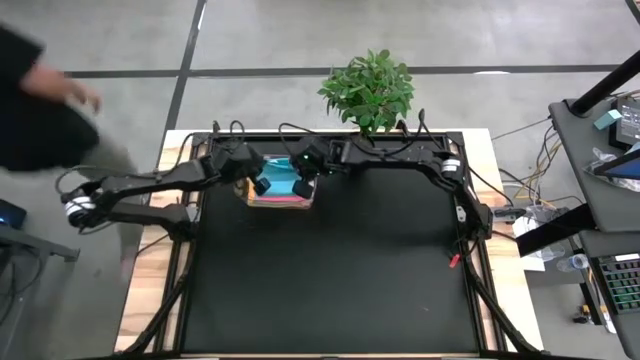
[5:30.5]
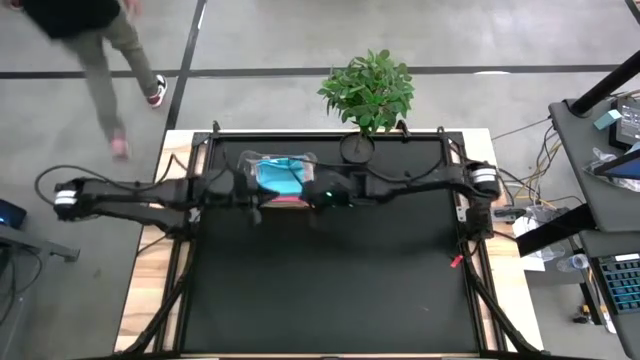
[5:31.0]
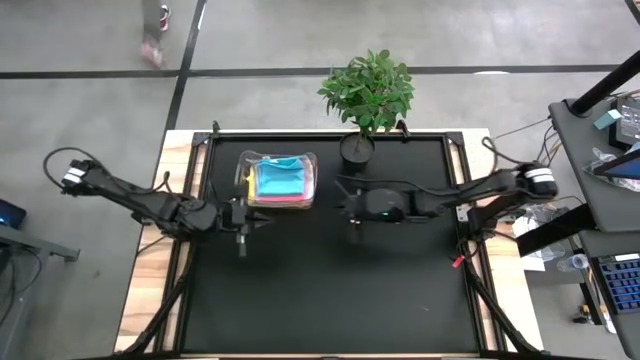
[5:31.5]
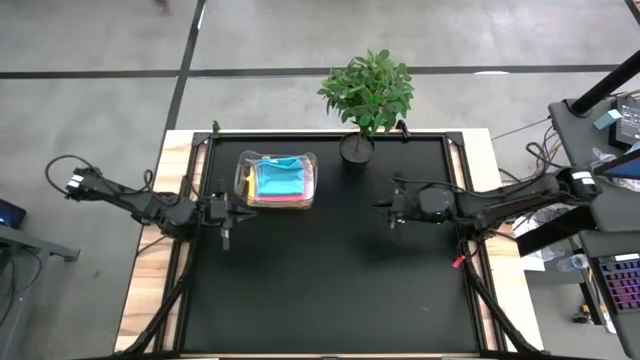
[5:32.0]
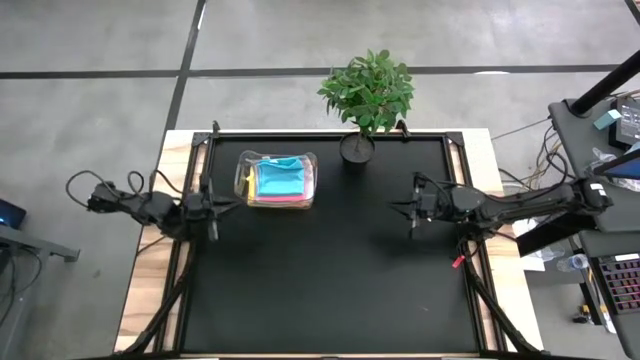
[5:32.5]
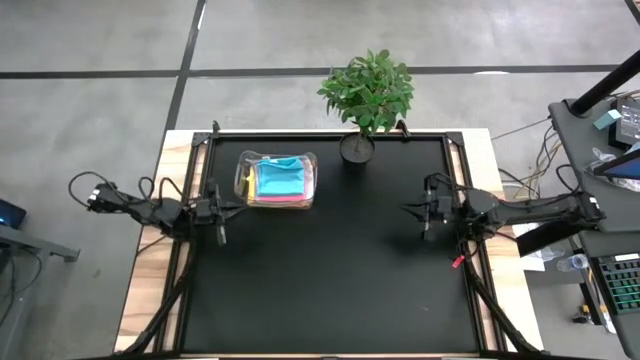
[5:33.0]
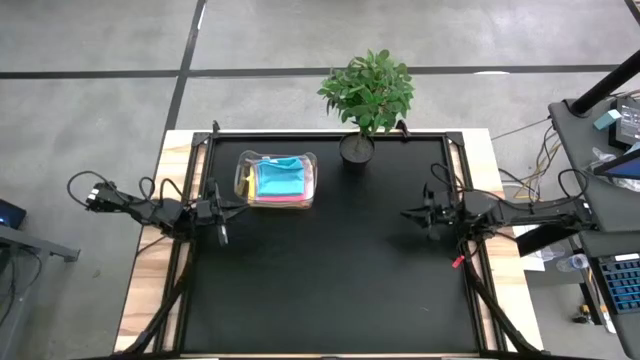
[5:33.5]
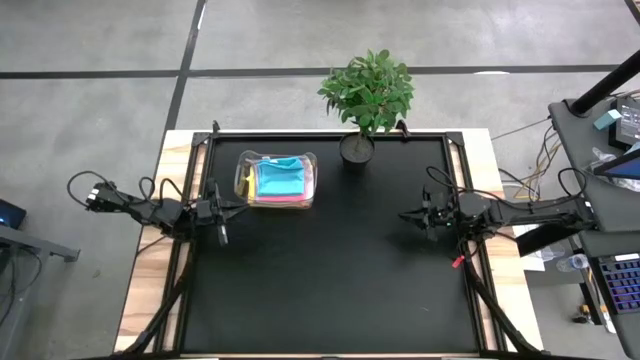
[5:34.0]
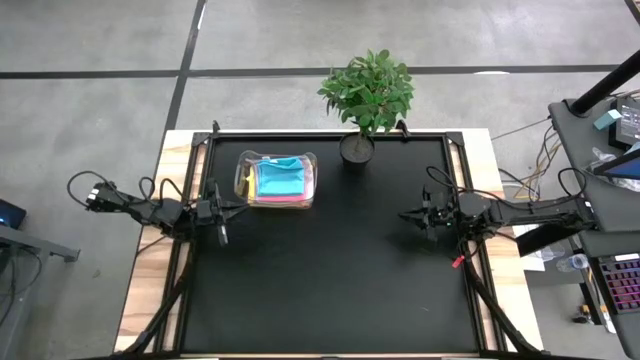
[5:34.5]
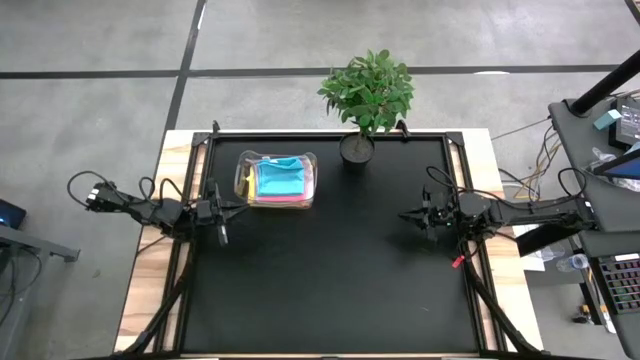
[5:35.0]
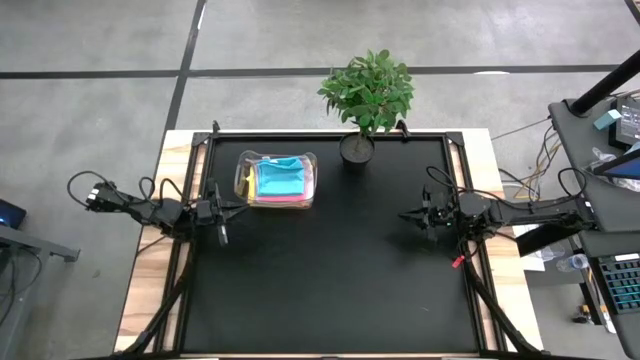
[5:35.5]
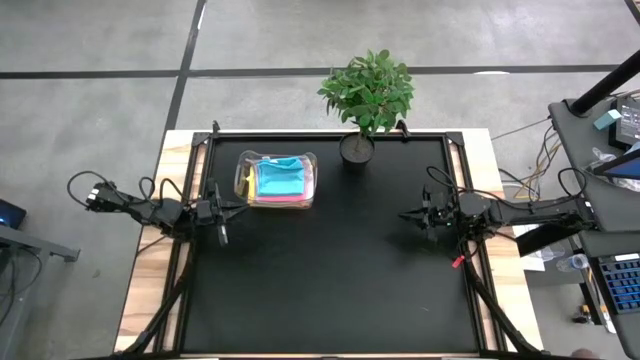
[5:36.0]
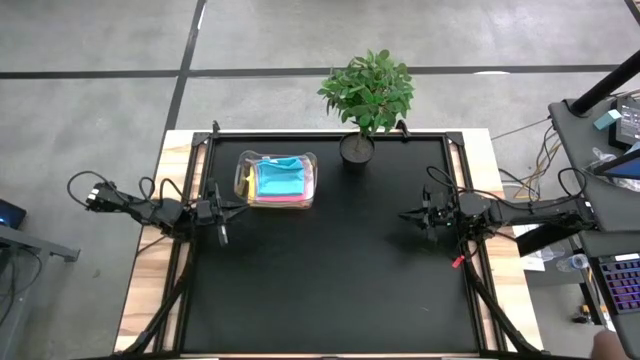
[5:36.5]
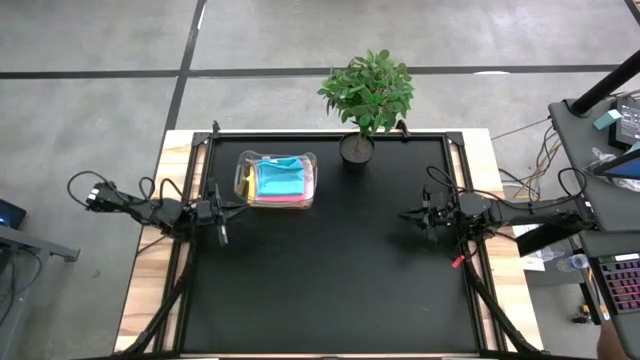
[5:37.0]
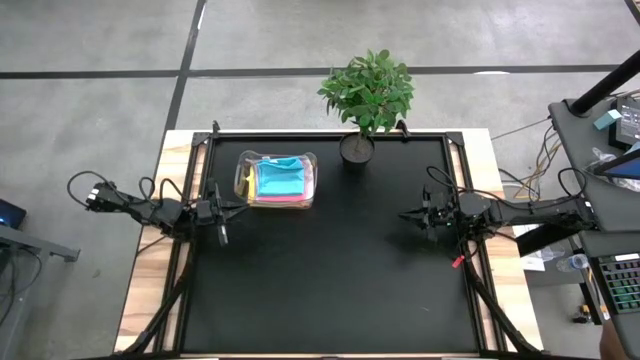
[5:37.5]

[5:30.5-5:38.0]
Task: Fold microfiber towels
Return to Home Position

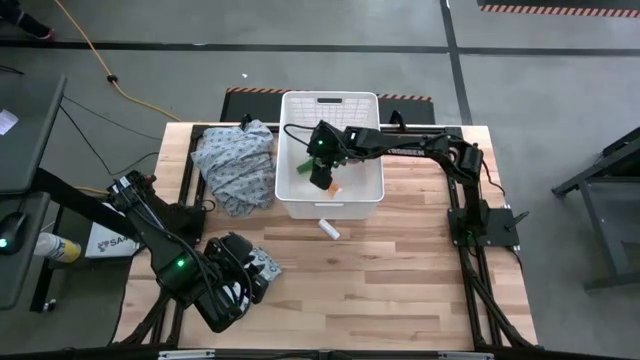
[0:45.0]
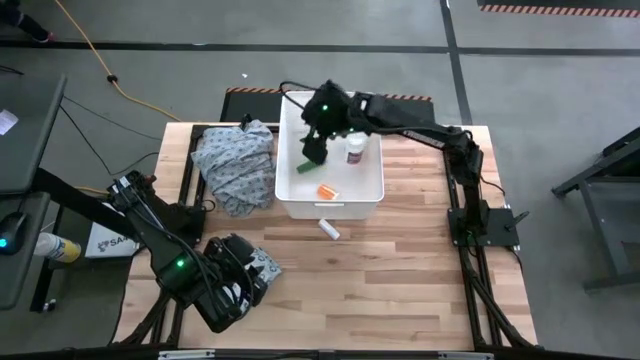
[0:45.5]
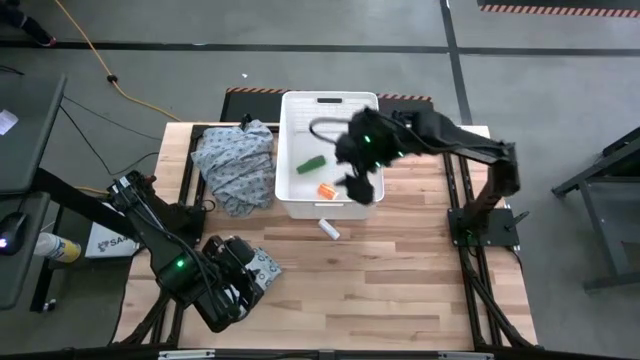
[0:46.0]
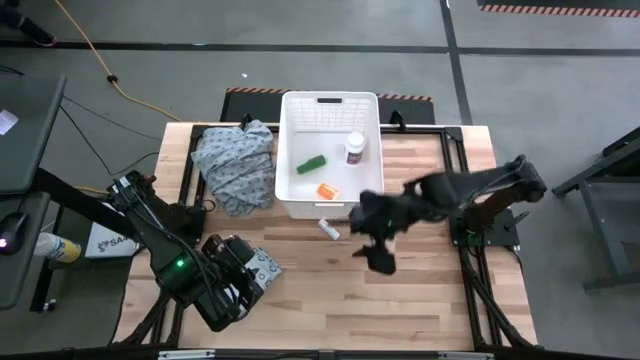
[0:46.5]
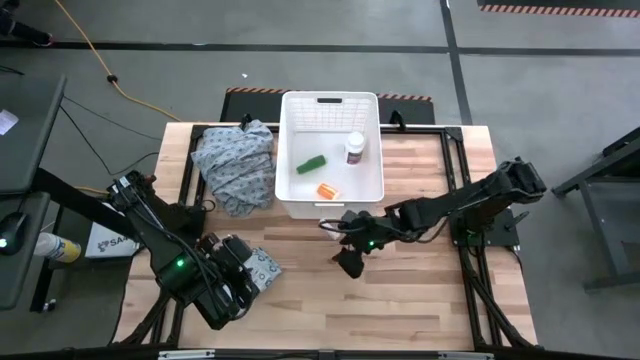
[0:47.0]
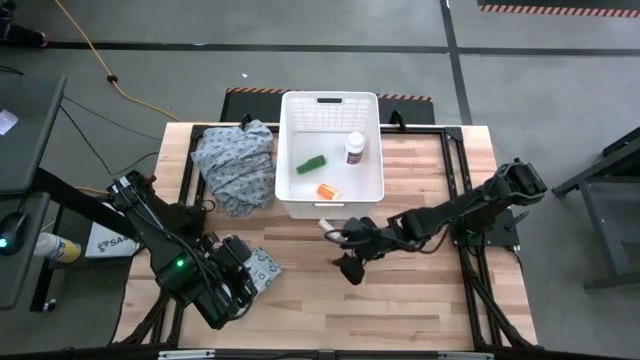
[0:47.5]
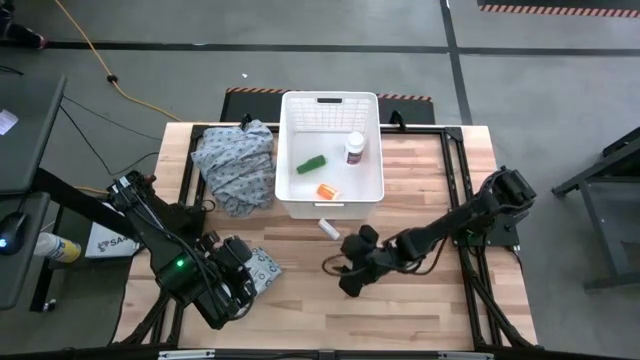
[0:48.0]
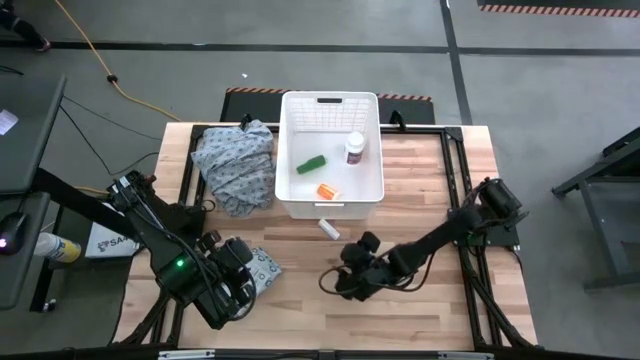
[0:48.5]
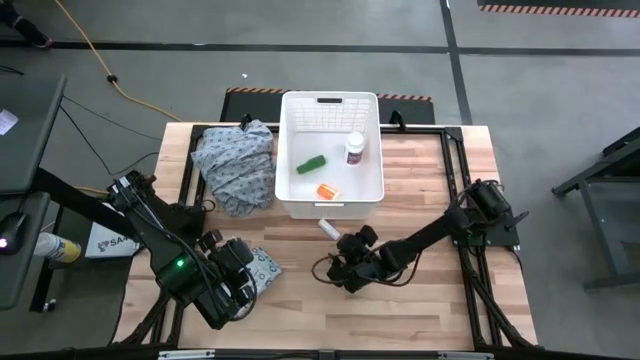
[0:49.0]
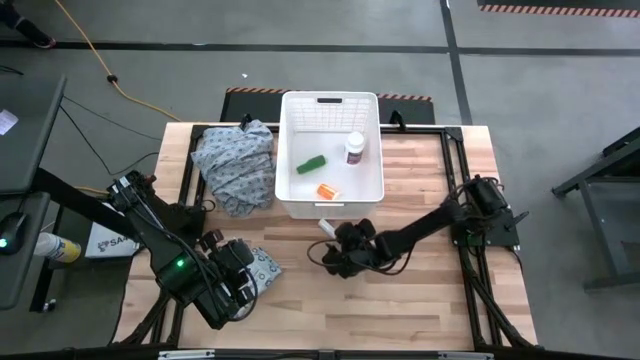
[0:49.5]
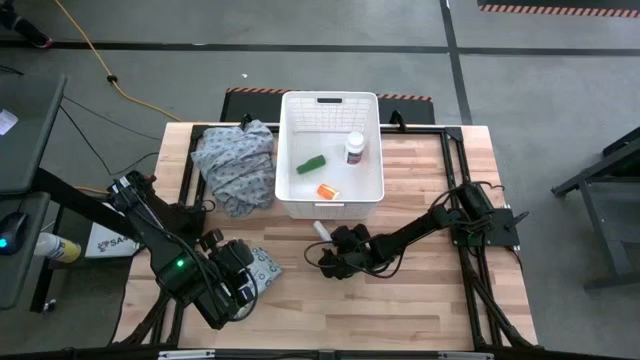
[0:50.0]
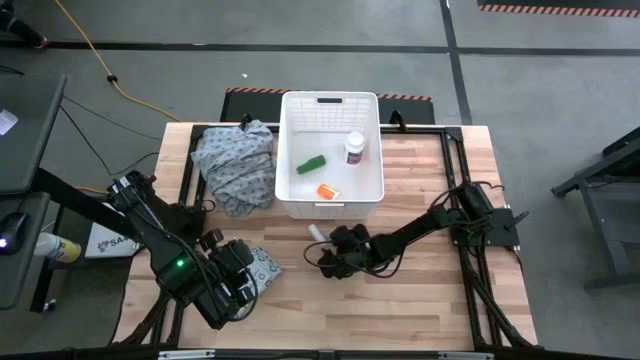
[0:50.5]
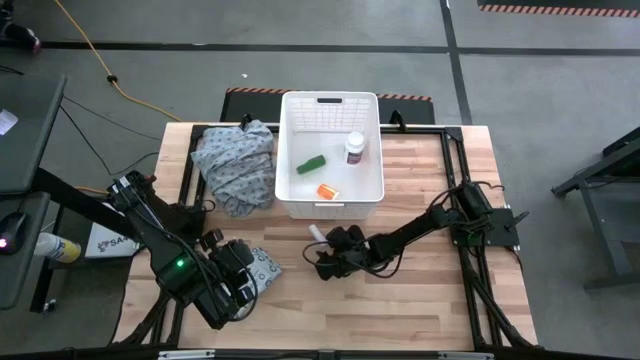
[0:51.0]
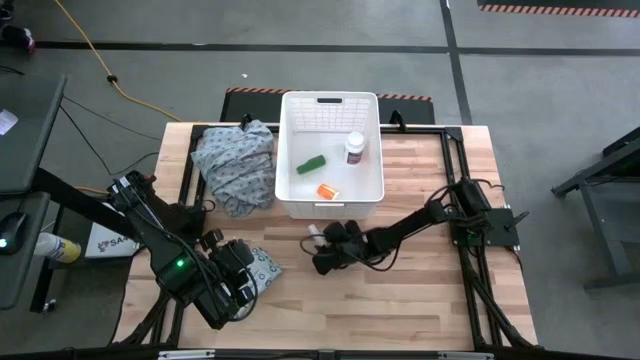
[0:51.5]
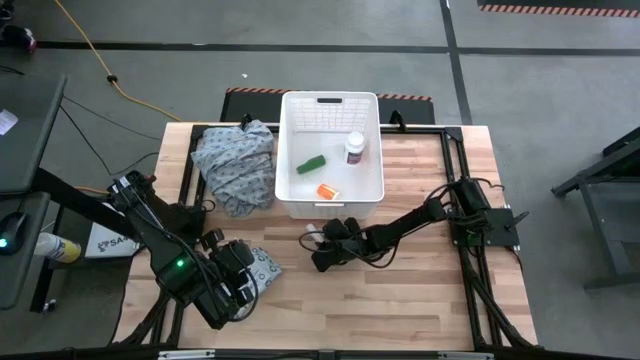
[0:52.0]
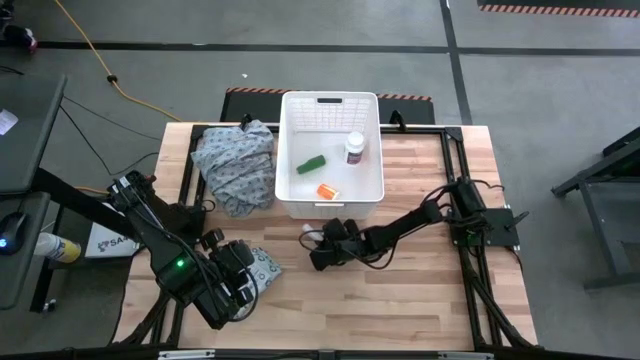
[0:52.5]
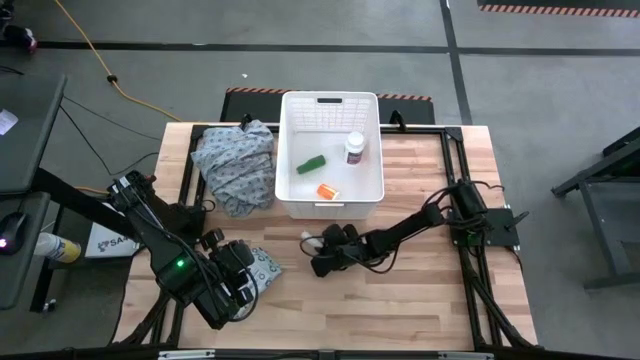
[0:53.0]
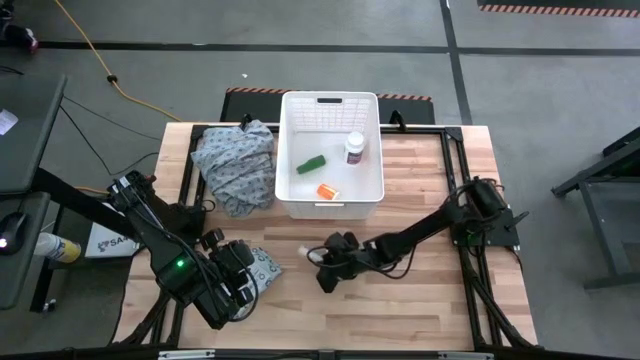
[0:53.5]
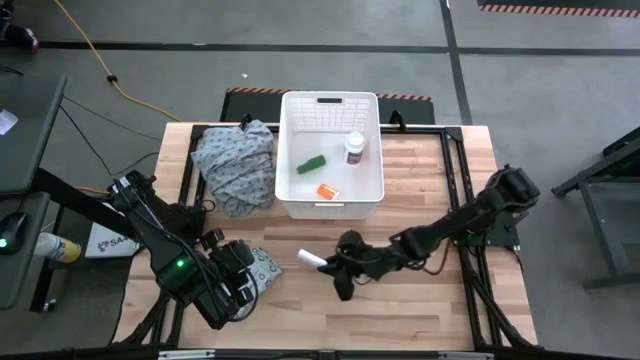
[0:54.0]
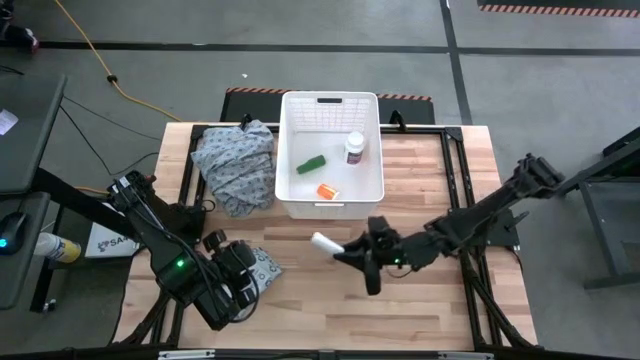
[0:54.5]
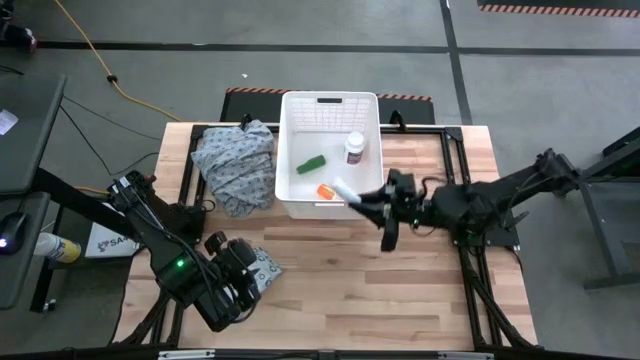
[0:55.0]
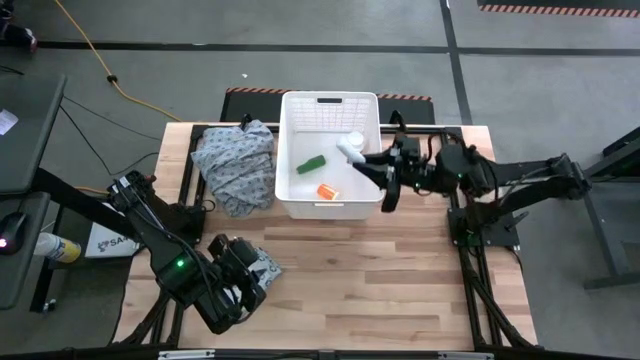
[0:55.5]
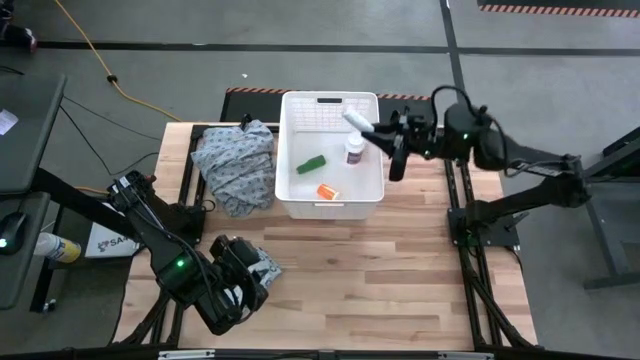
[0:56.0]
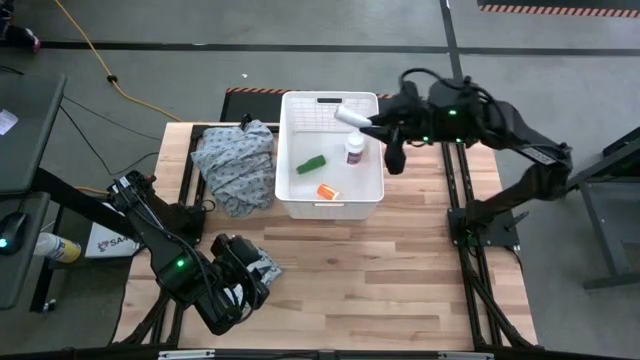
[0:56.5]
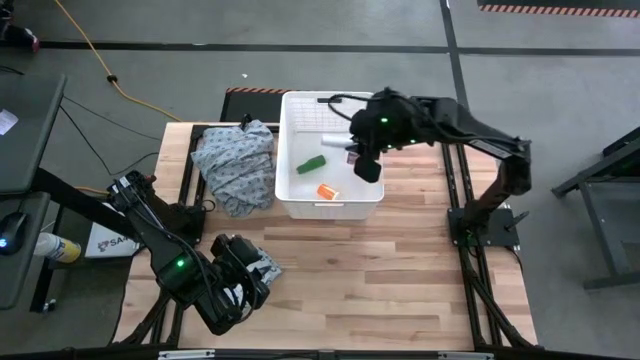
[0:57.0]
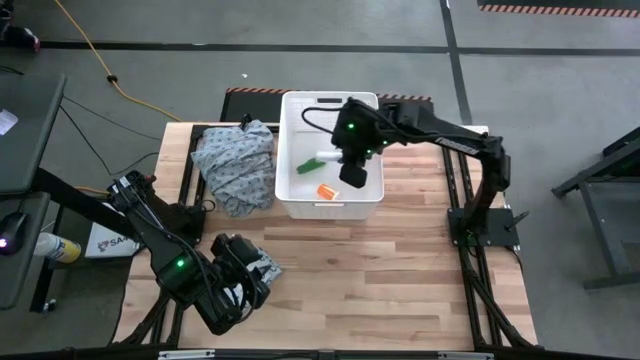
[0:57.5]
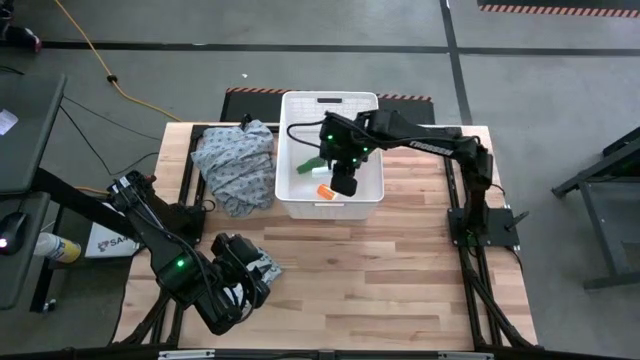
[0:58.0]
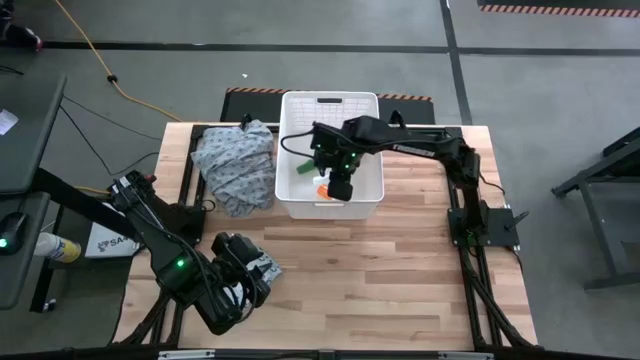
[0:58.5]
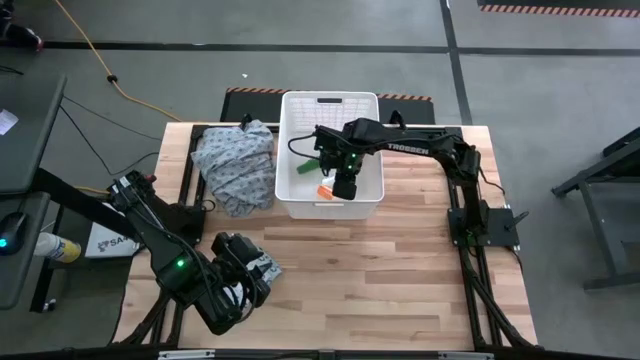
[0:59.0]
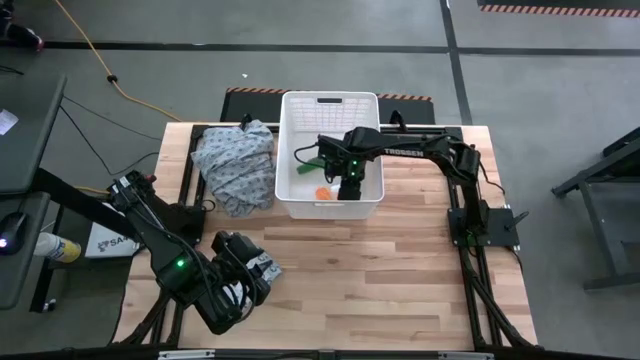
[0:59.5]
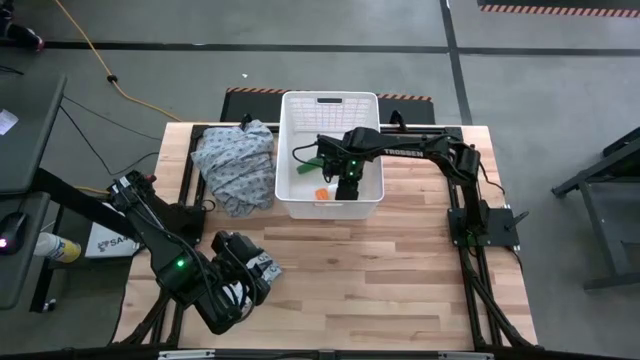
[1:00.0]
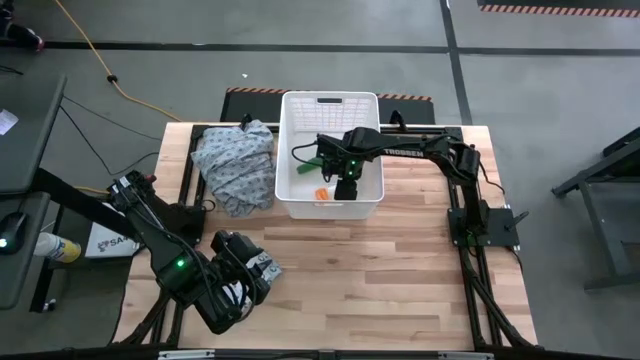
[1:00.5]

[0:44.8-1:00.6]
Task: Pick & place medical supplies in basket/bin
Put the white roll gauze into the white bin
